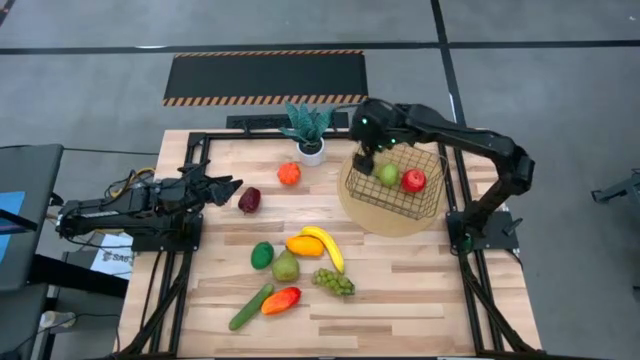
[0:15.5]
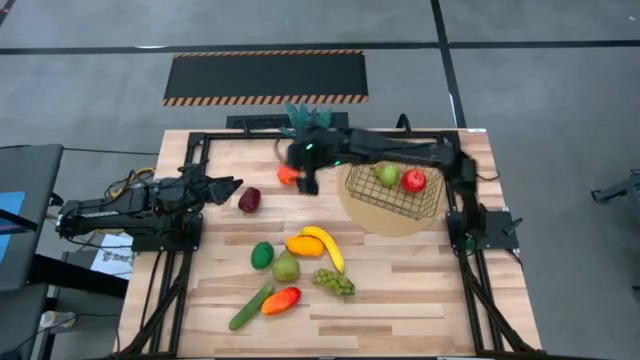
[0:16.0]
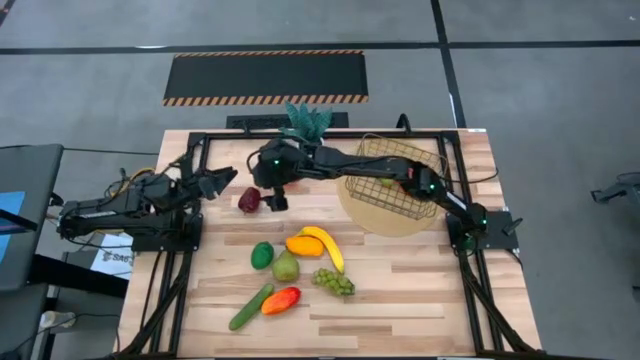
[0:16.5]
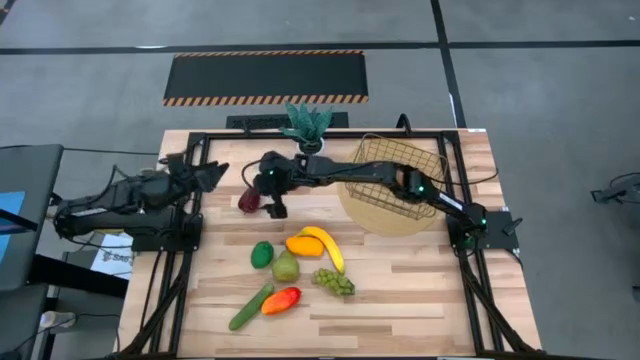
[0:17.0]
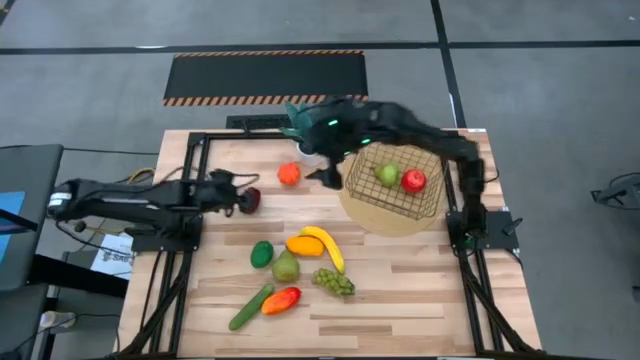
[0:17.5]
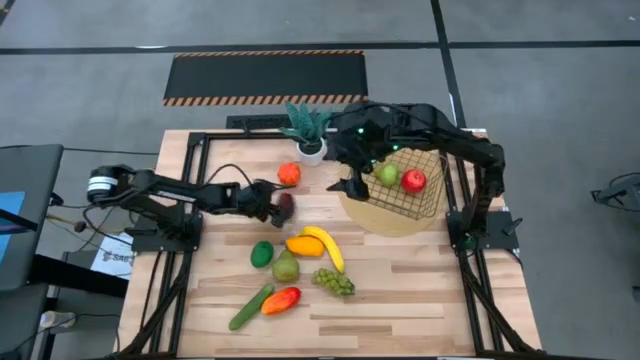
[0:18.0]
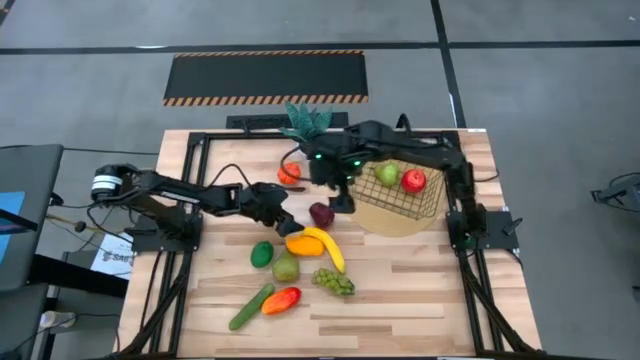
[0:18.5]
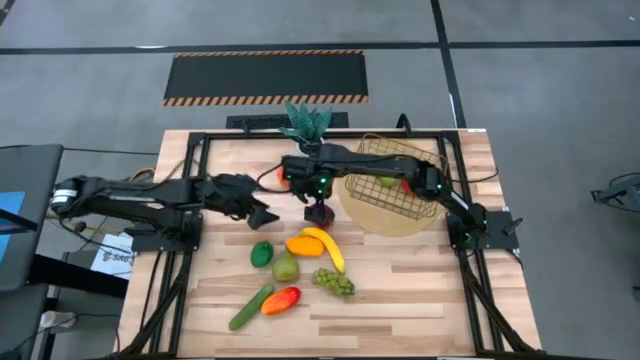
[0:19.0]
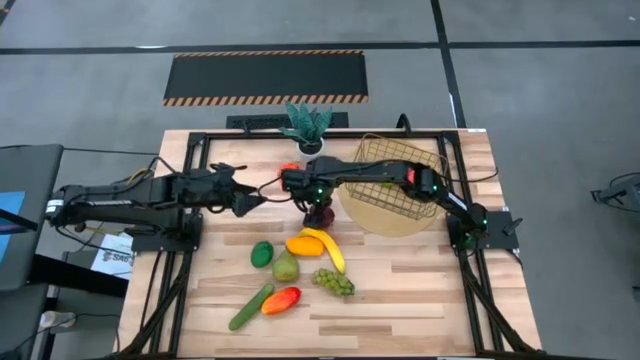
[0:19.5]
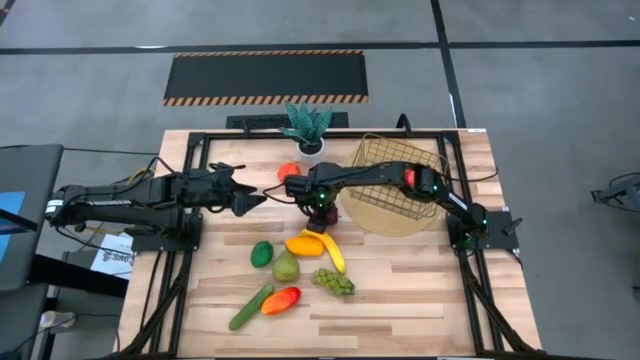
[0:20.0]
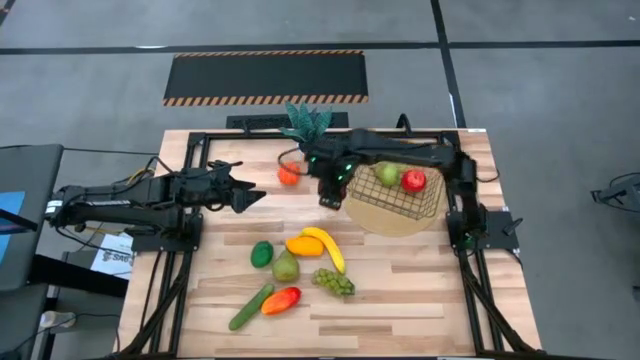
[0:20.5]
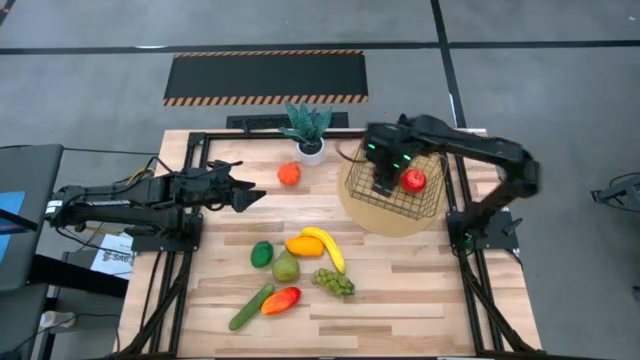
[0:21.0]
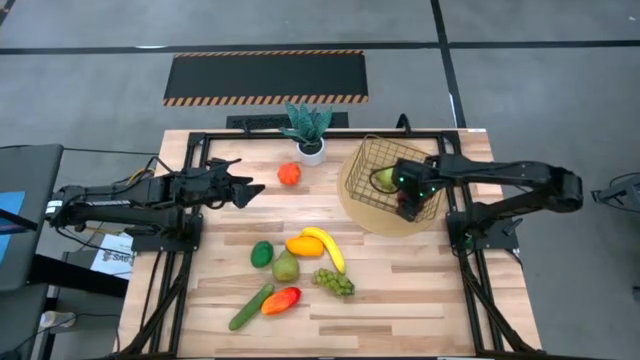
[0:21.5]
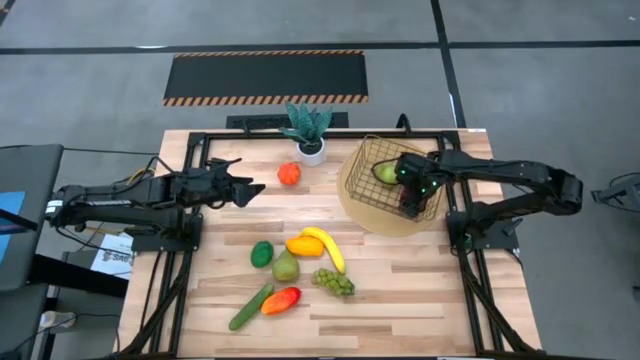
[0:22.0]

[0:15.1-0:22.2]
Task: Build produce basket
Put the dark red apple into the wire basket

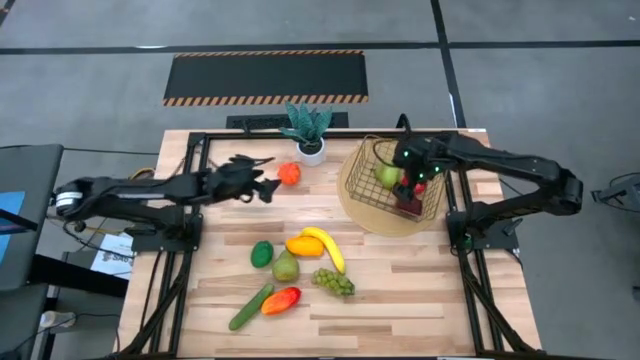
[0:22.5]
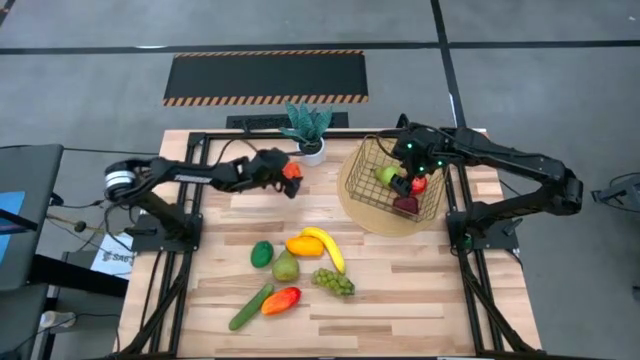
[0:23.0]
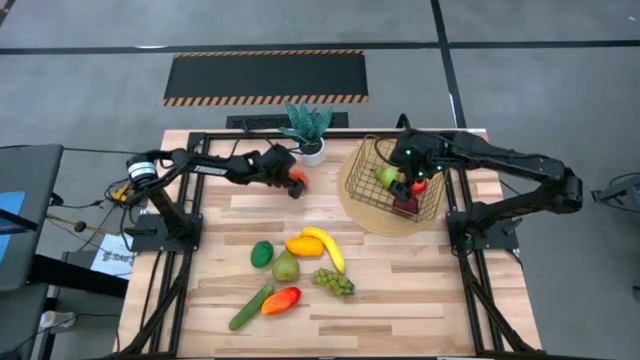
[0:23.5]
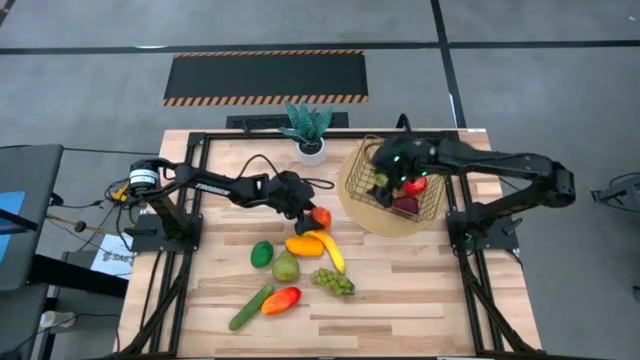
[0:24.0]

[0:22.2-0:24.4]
Put the orange pumpkin into the wire basket

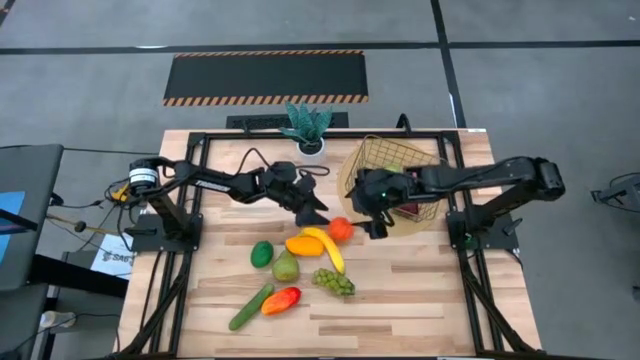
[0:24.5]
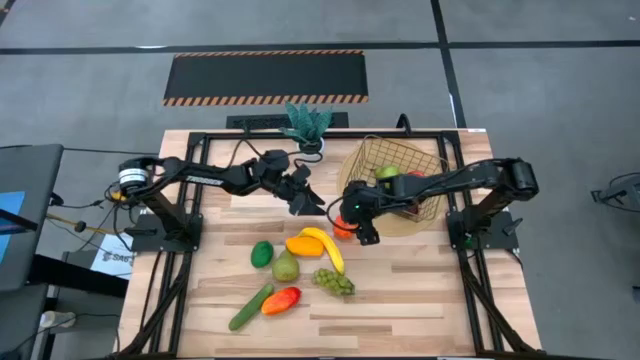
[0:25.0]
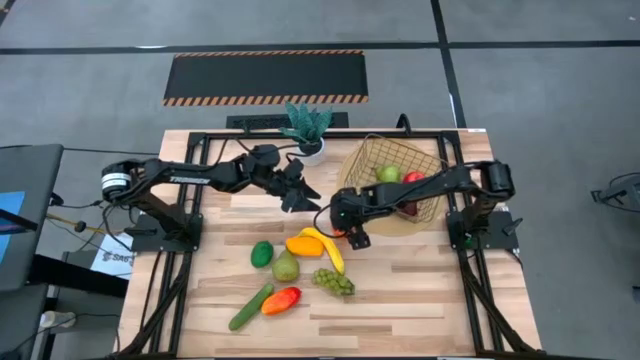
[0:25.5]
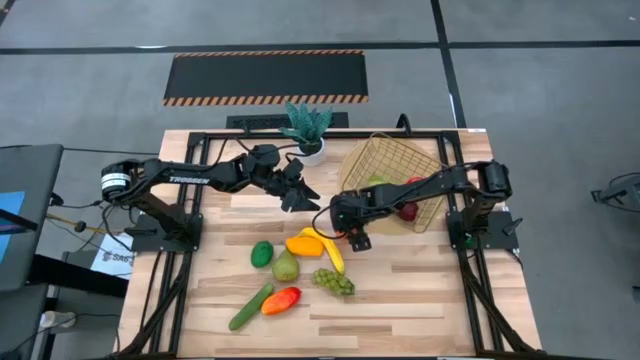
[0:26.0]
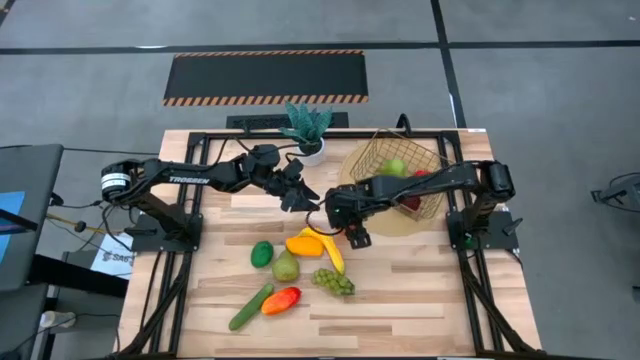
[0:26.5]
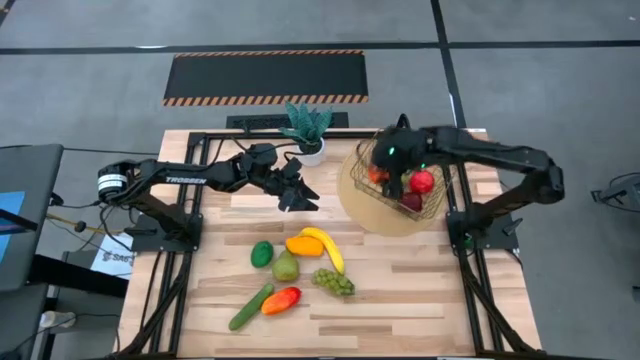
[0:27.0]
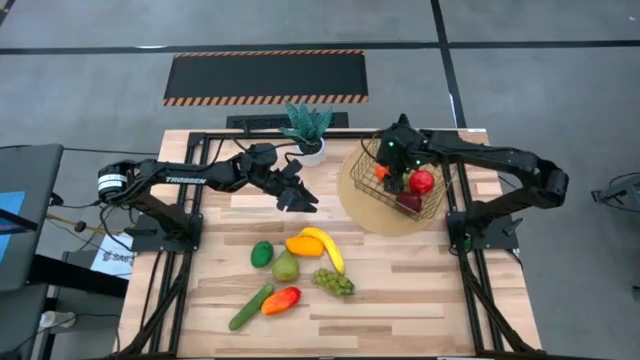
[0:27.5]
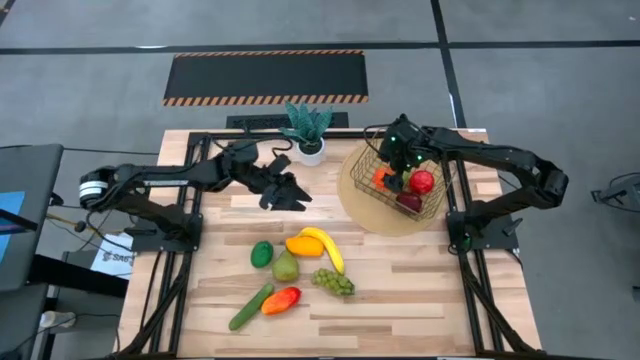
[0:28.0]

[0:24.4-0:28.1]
Put the orange pumpkin into the wire basket

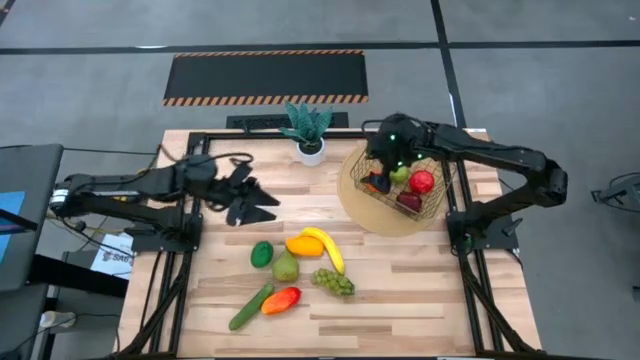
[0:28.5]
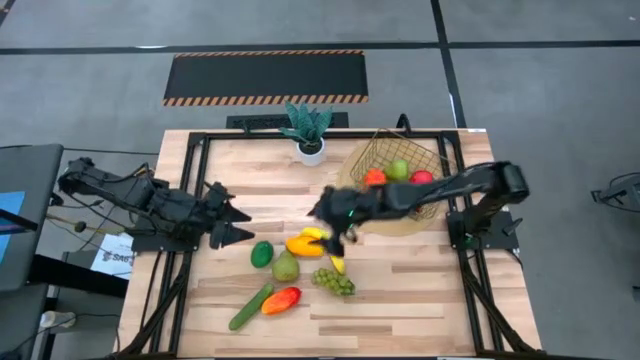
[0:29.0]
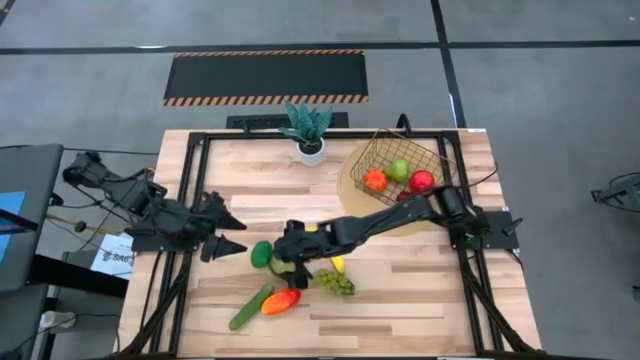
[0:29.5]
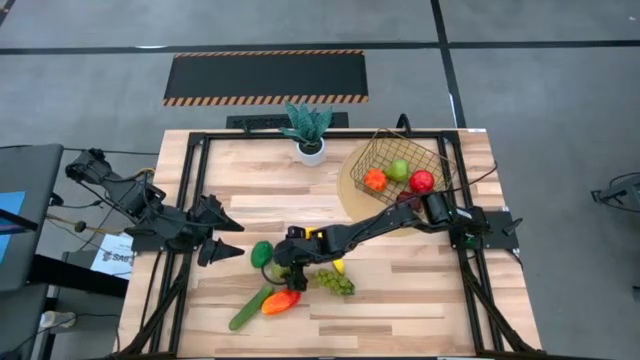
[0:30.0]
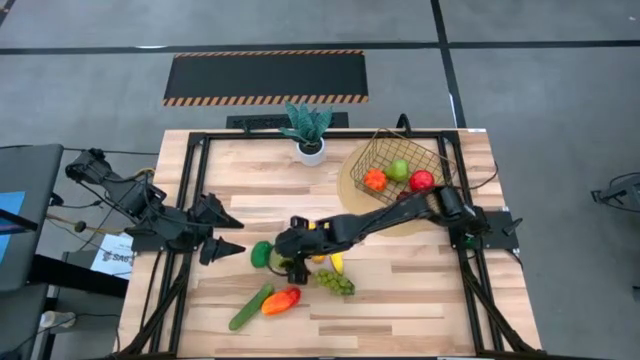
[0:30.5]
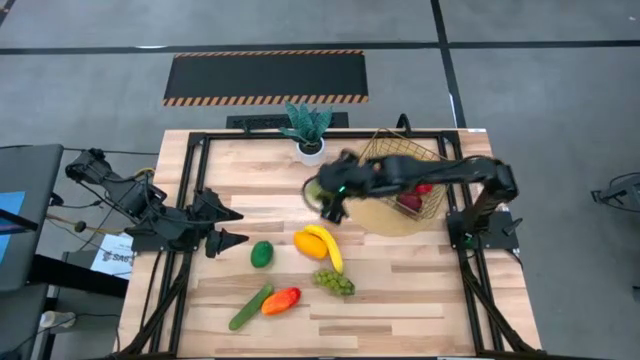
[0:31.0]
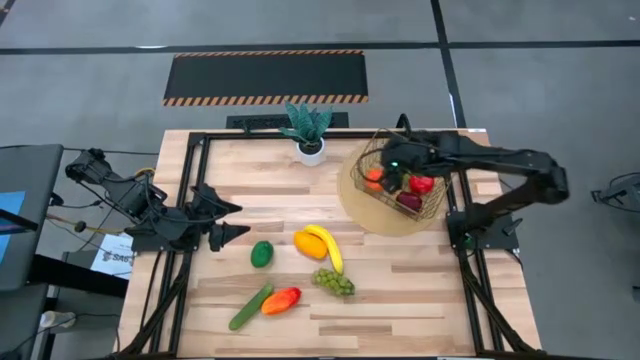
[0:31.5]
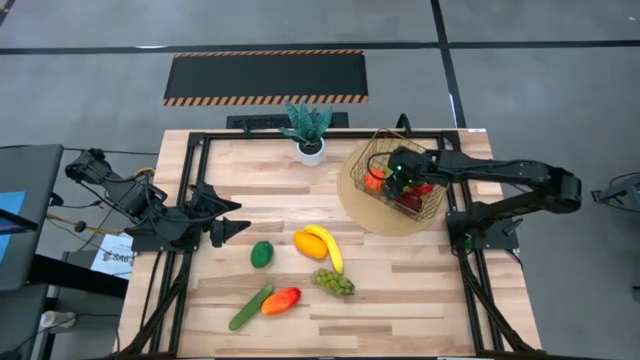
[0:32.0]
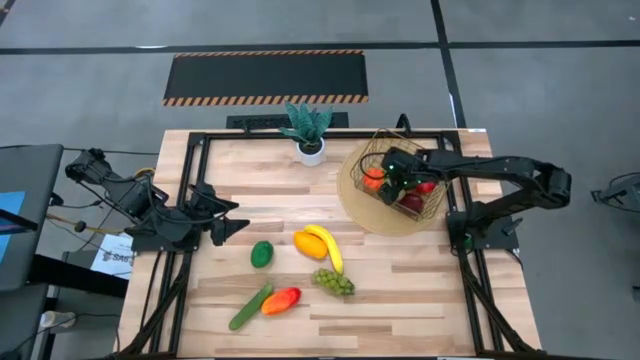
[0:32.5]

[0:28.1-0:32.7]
Put the green pear into the wire basket

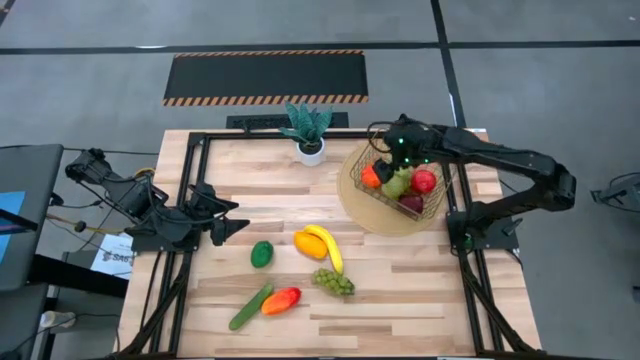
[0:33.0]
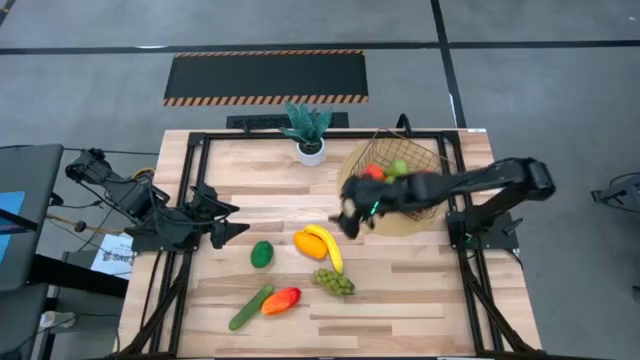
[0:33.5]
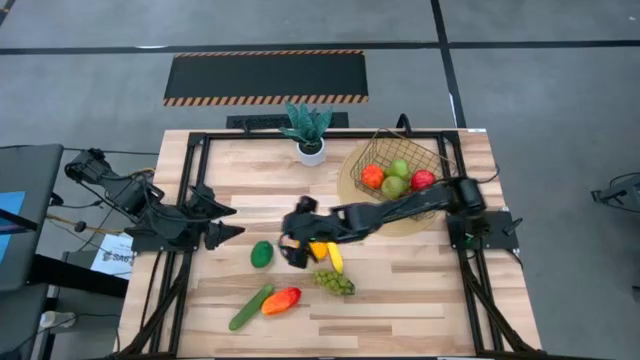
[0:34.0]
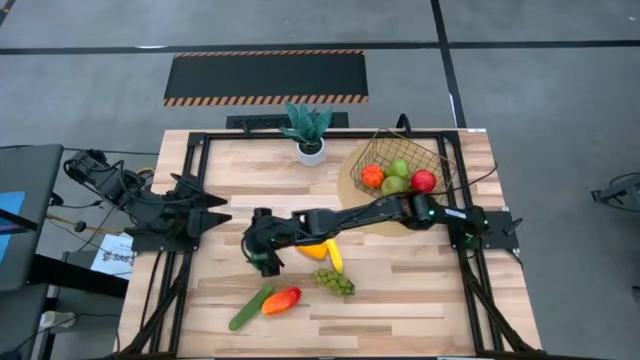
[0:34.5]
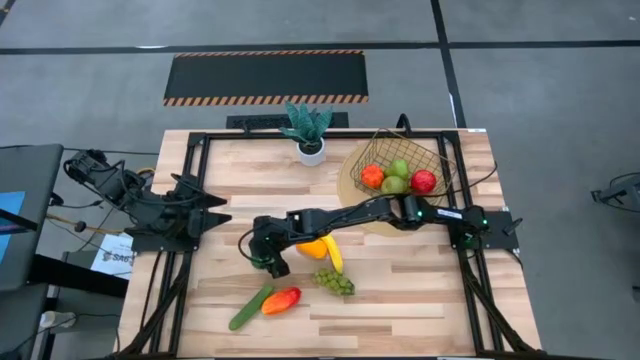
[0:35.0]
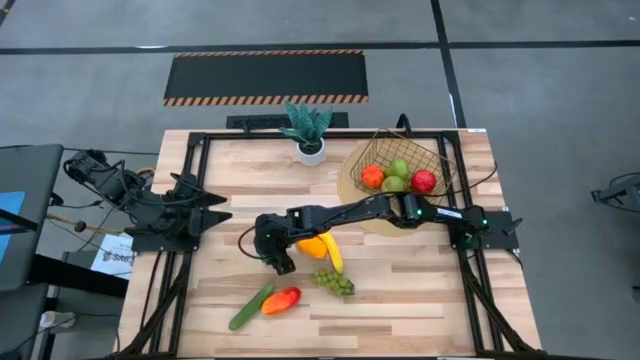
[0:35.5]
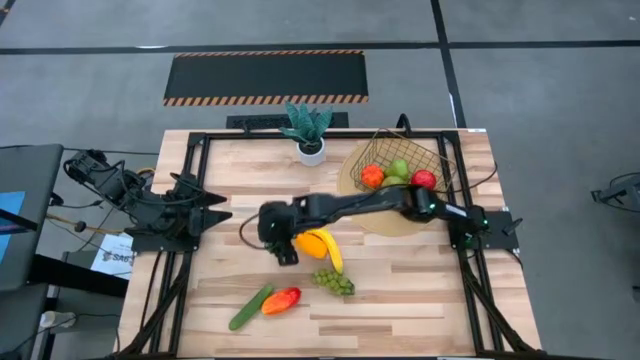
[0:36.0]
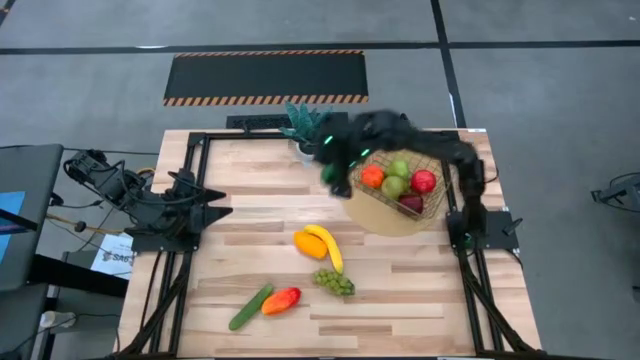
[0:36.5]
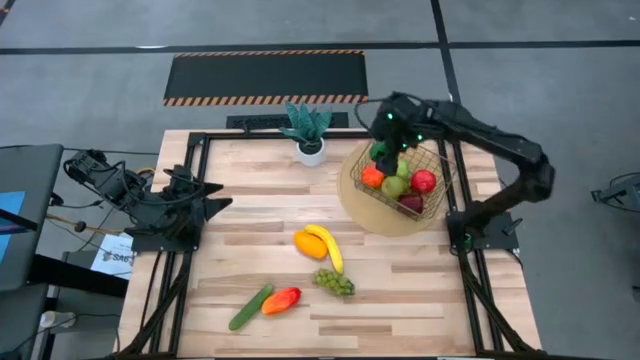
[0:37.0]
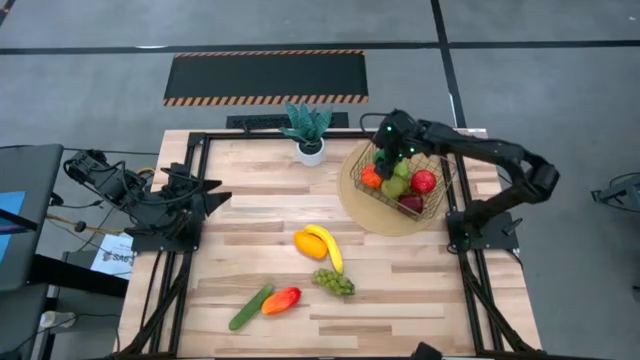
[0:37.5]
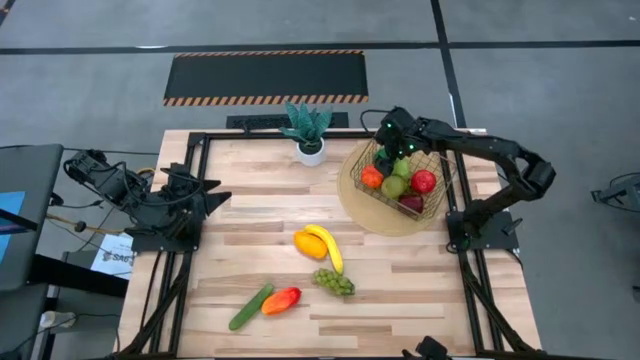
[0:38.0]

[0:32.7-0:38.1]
Put the green lime into the wire basket
